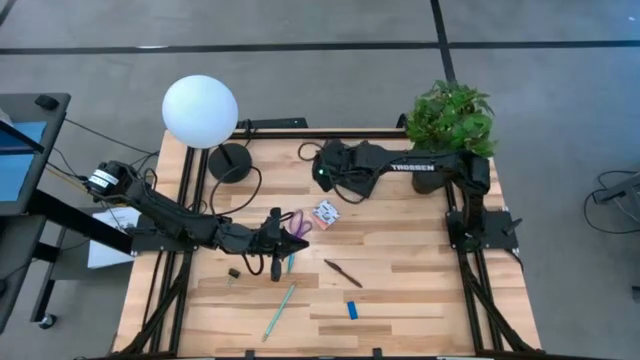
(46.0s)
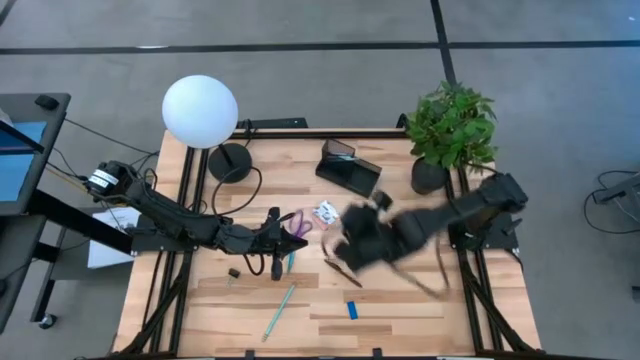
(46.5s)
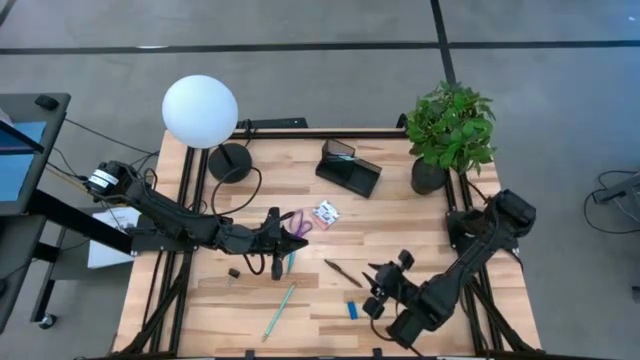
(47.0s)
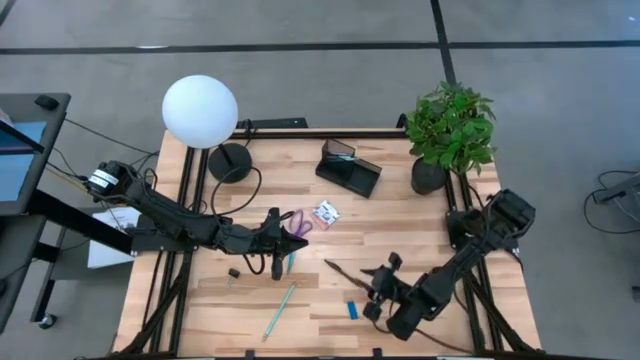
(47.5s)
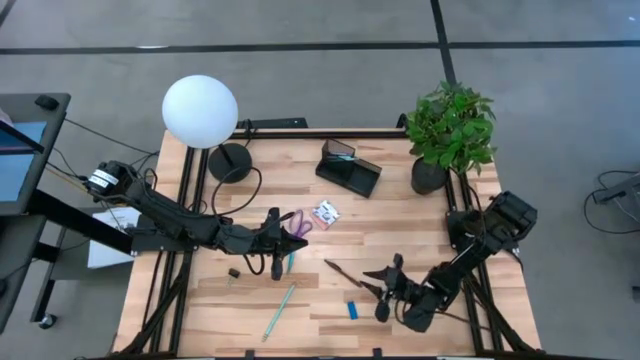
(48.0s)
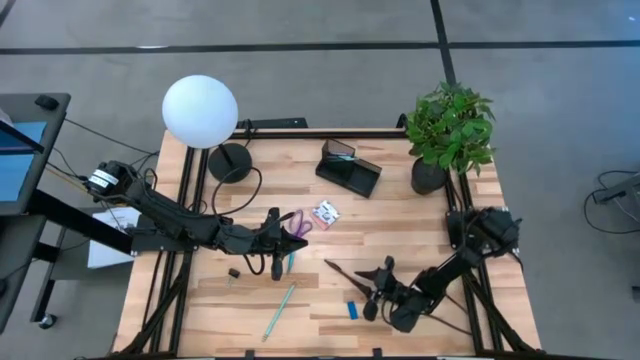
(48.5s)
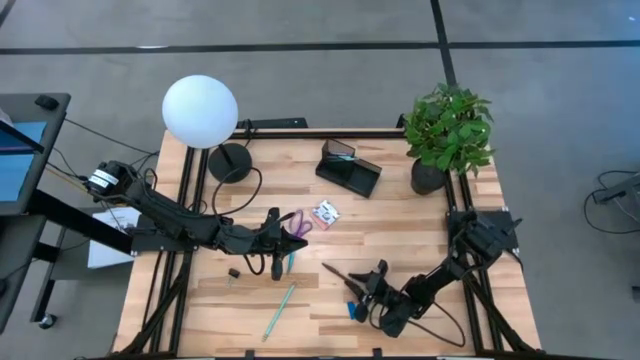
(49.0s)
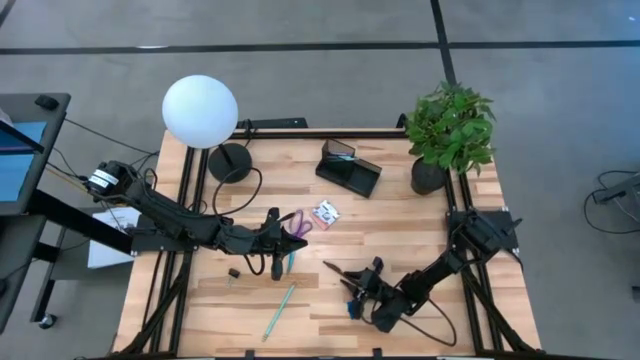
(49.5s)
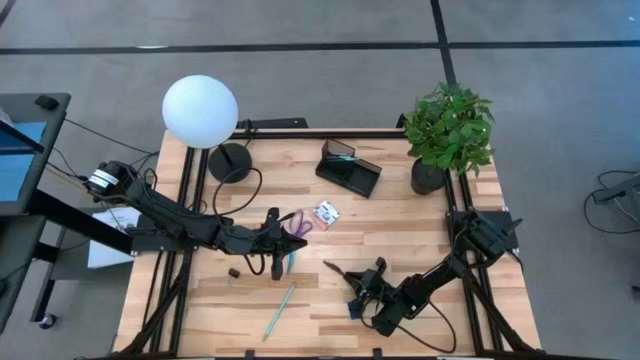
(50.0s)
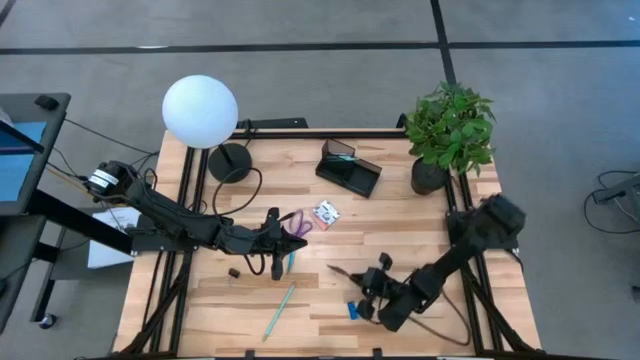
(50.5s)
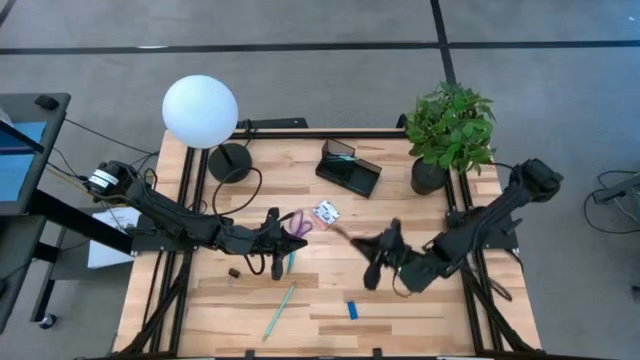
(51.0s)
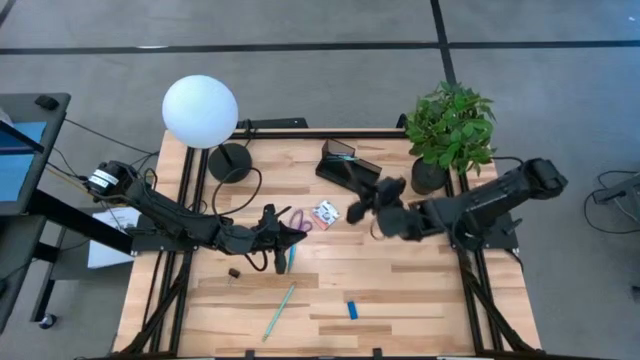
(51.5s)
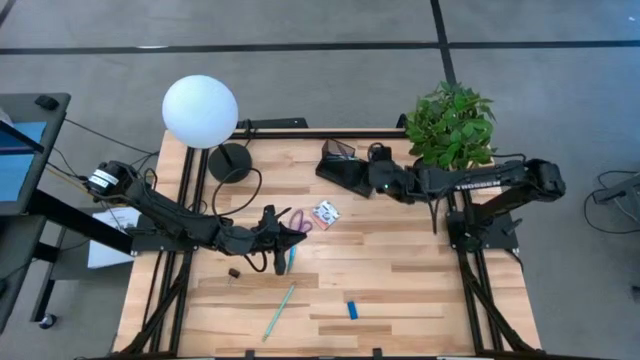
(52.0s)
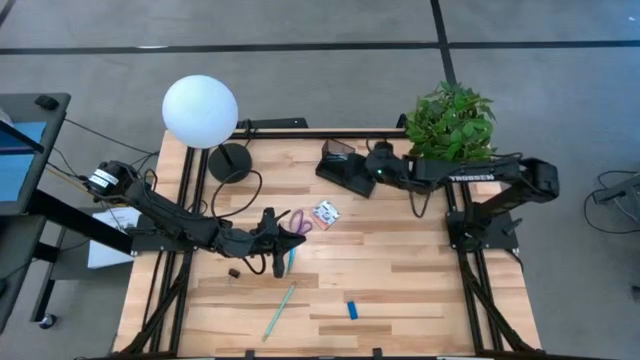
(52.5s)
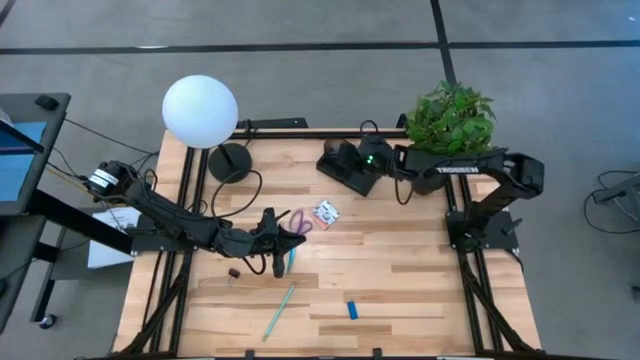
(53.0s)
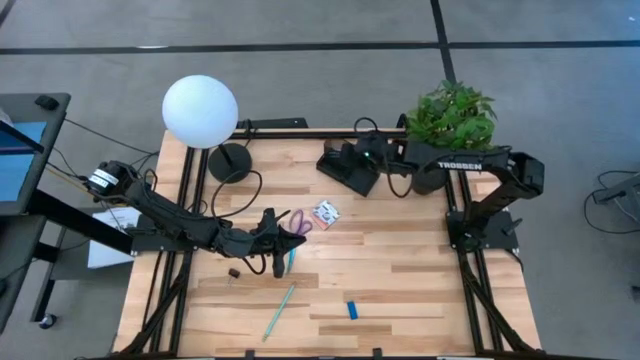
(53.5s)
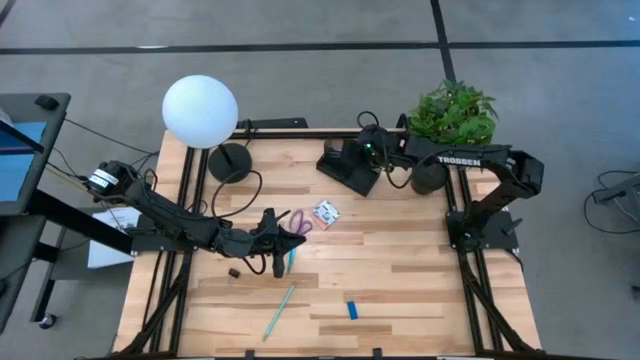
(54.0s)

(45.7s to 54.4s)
Task: Pick and place office supplies into organizer
Put the brown pen into the black desk organizer

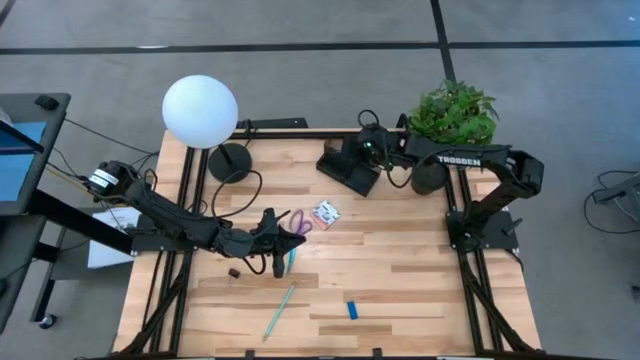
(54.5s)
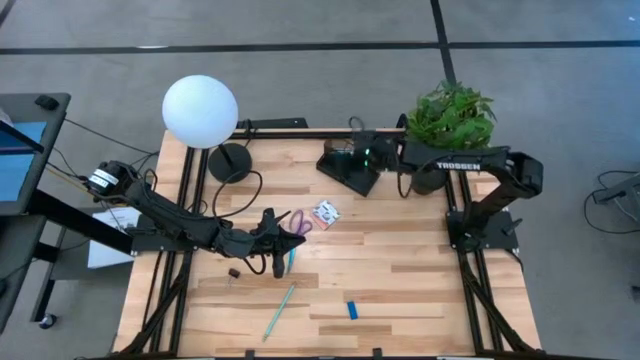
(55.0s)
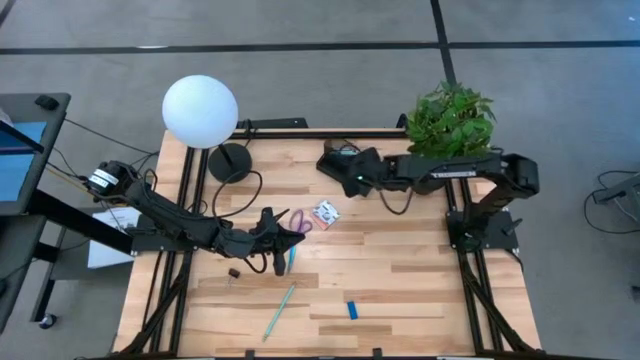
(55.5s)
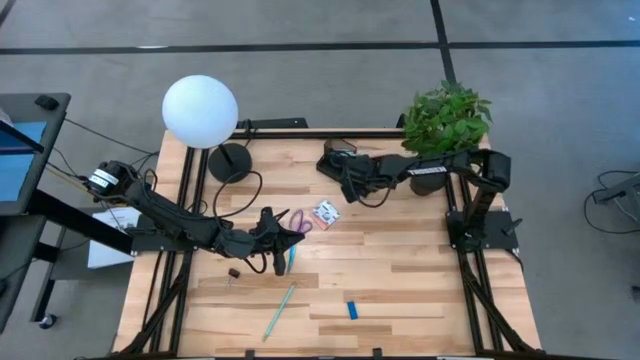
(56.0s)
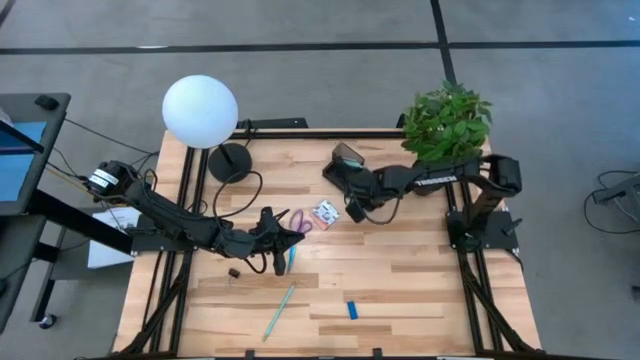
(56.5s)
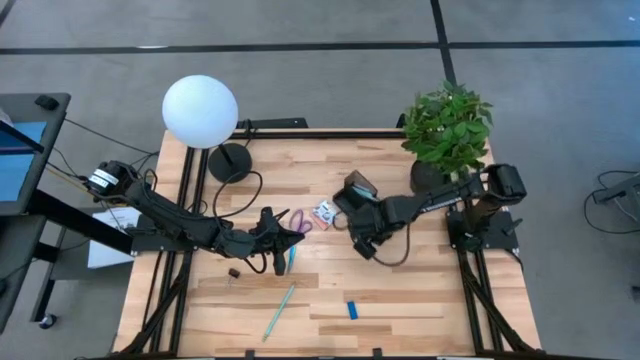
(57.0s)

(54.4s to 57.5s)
Move the black desk organizer to the center of the table

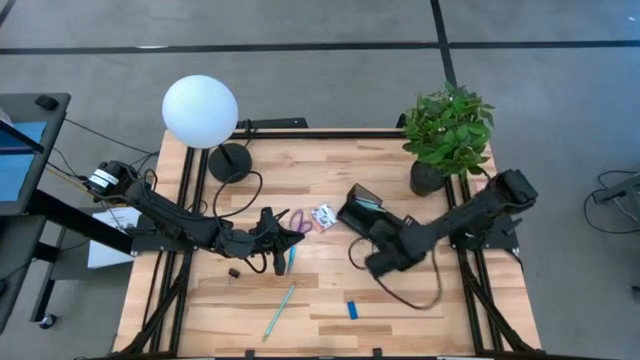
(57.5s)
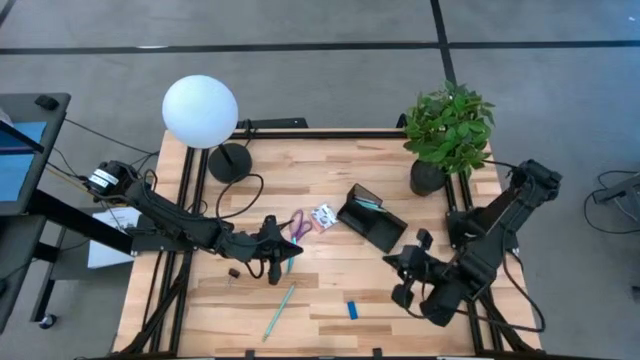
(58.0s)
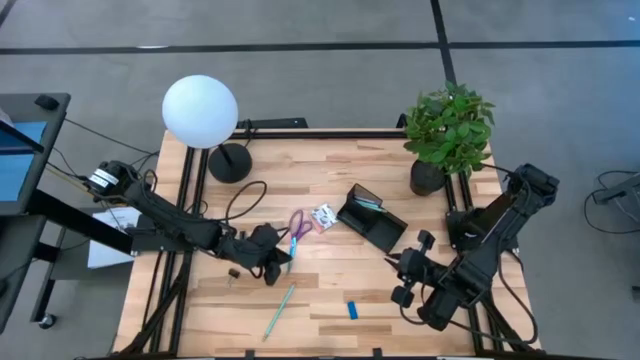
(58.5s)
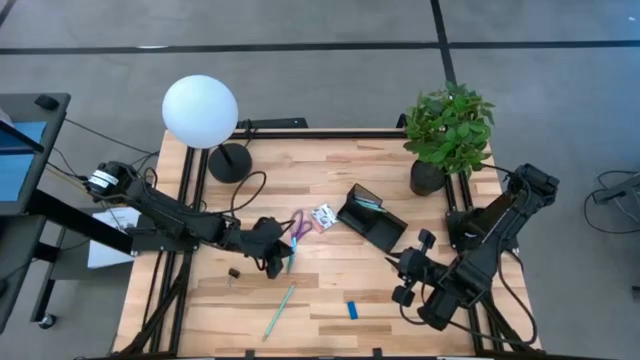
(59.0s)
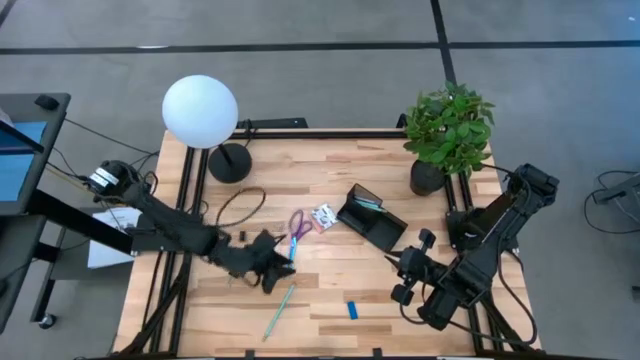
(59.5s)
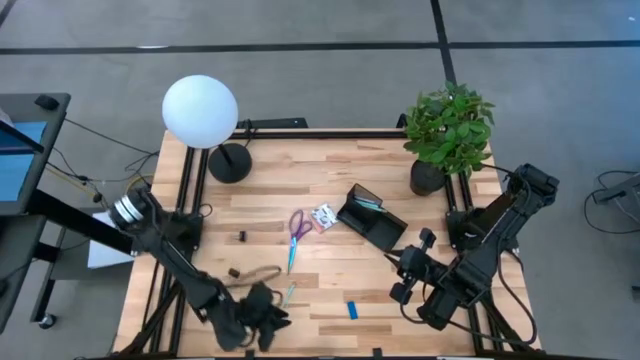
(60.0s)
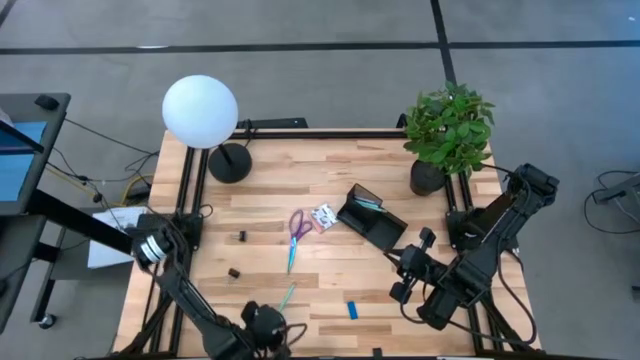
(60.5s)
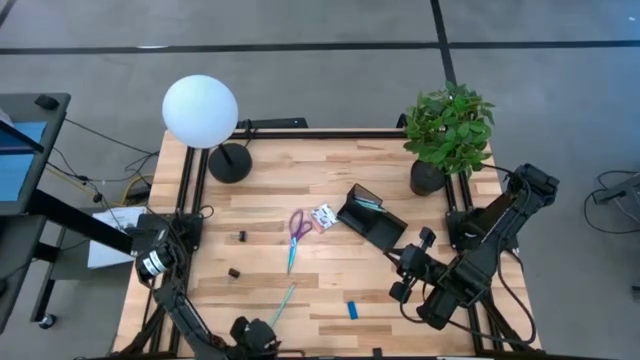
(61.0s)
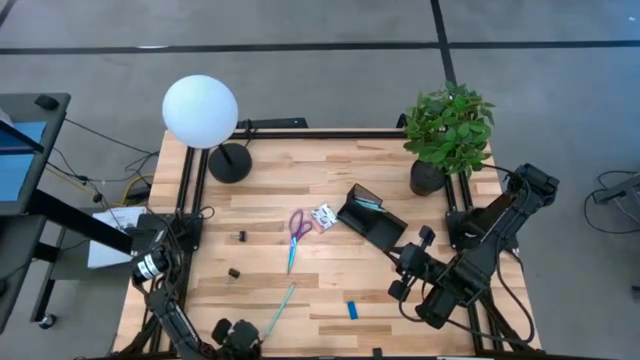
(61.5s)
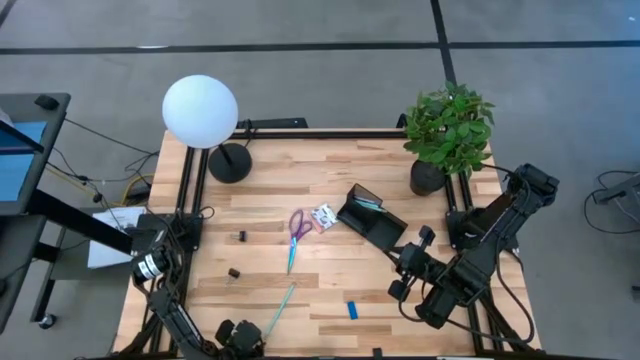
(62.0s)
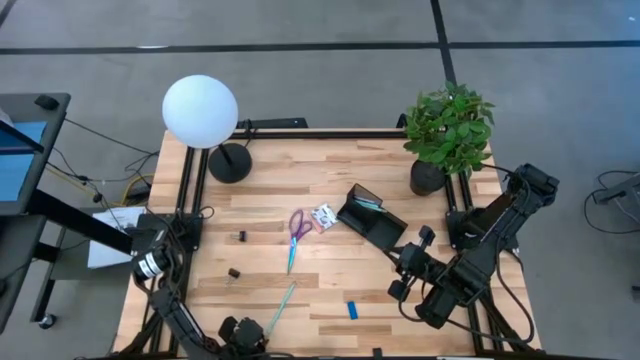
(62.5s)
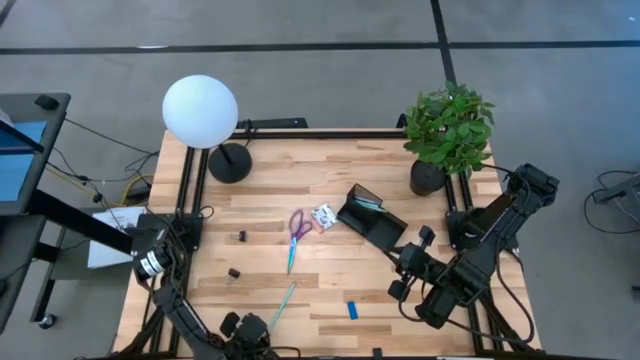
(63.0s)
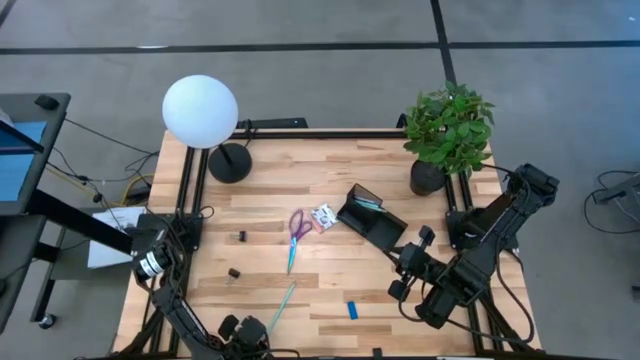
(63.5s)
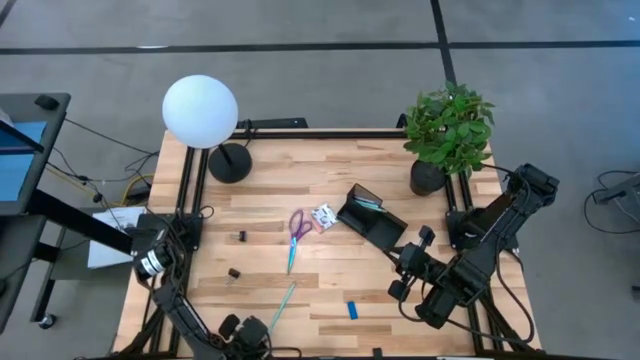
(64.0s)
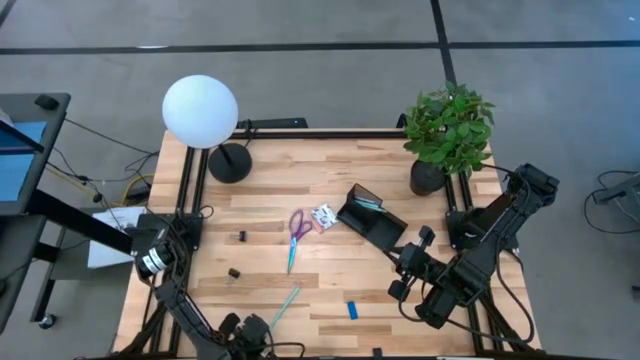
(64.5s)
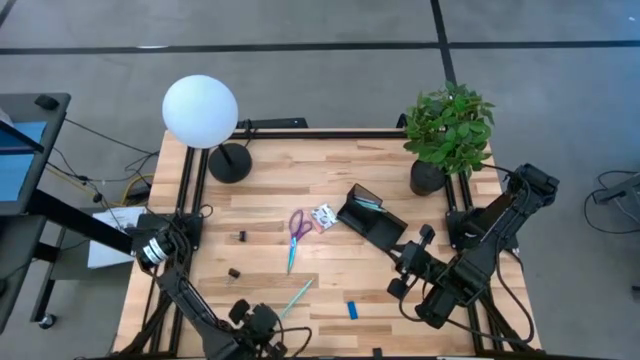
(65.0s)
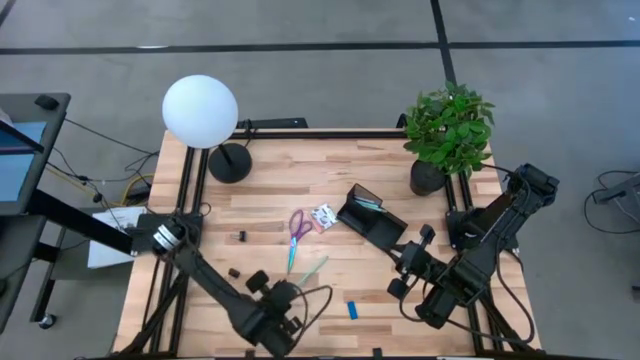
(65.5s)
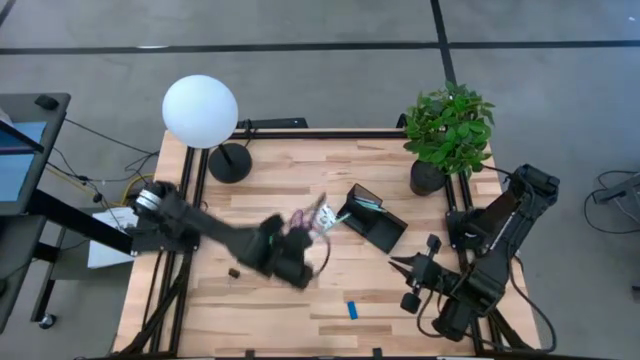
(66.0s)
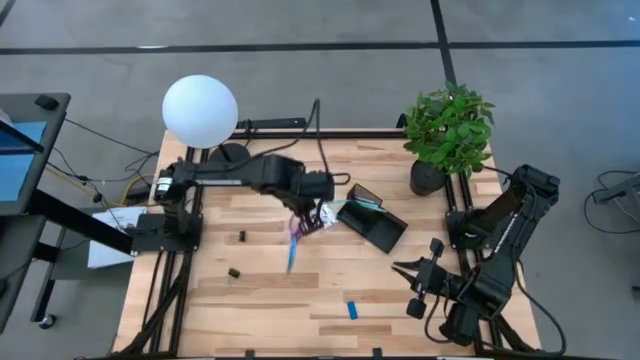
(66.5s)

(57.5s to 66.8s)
Put the light blue pencil into the black desk organizer
